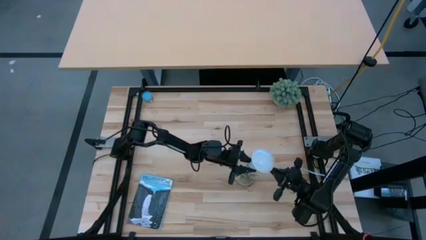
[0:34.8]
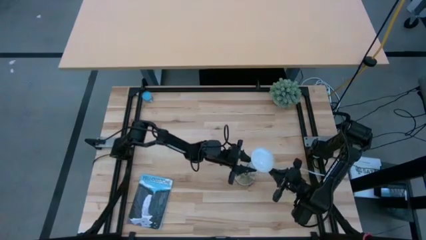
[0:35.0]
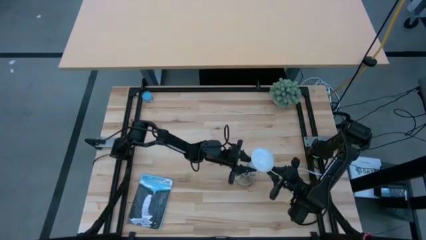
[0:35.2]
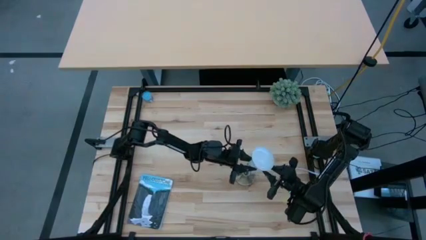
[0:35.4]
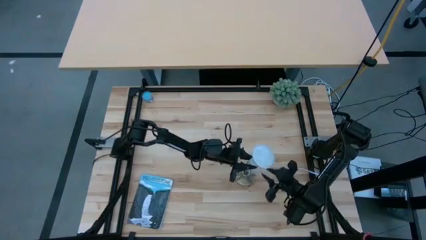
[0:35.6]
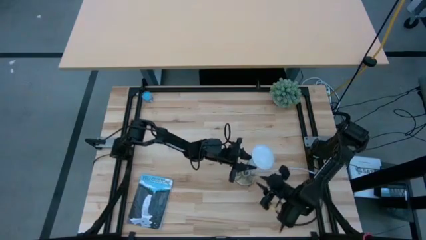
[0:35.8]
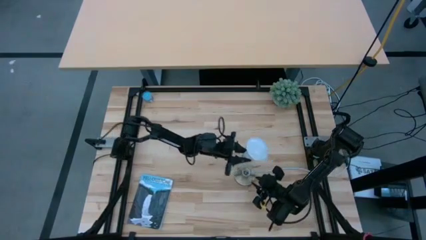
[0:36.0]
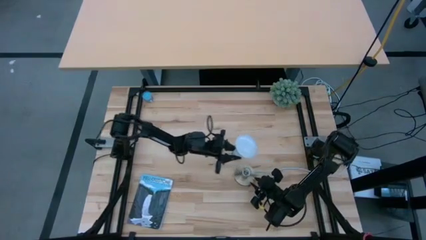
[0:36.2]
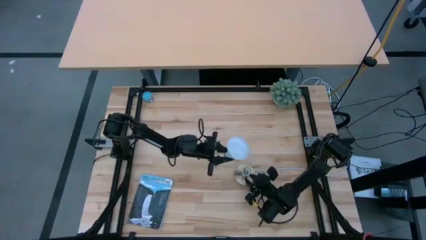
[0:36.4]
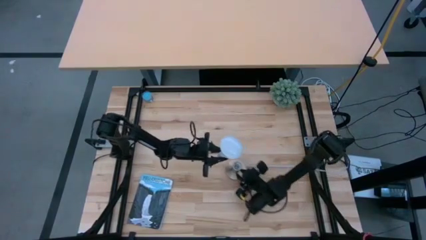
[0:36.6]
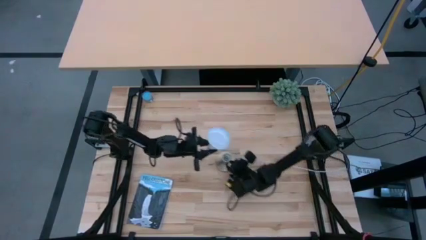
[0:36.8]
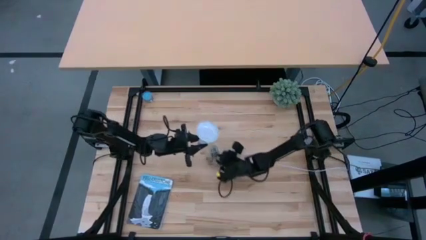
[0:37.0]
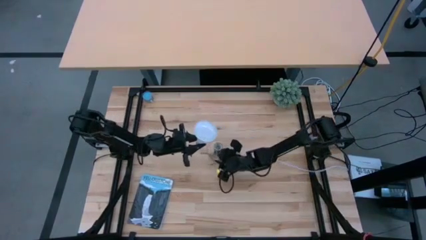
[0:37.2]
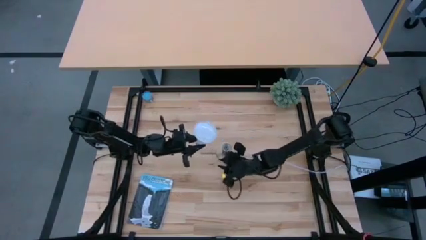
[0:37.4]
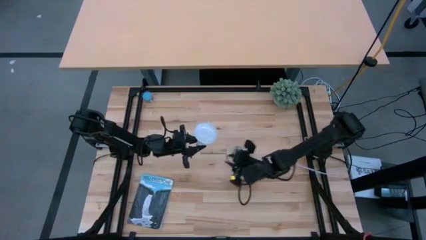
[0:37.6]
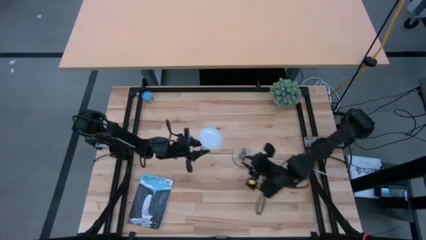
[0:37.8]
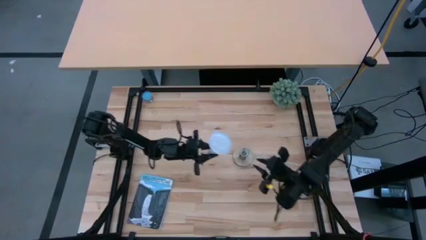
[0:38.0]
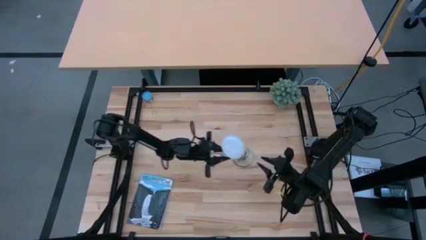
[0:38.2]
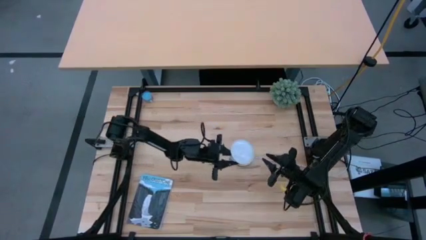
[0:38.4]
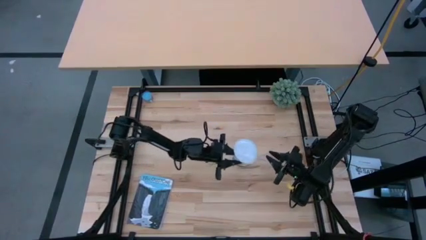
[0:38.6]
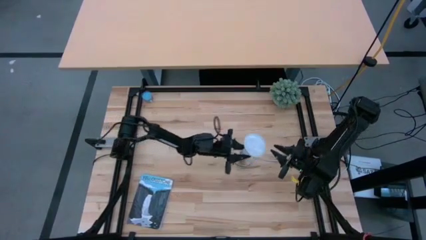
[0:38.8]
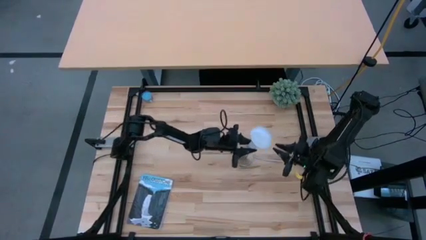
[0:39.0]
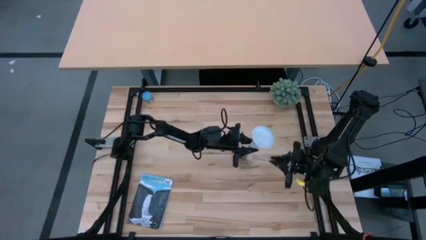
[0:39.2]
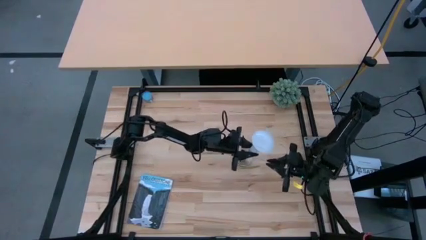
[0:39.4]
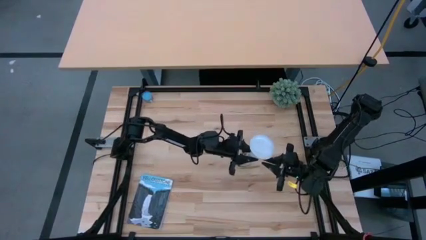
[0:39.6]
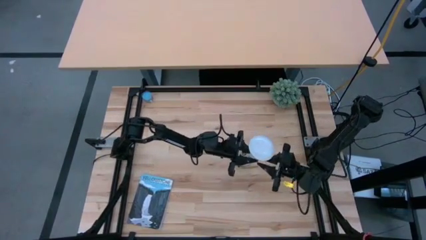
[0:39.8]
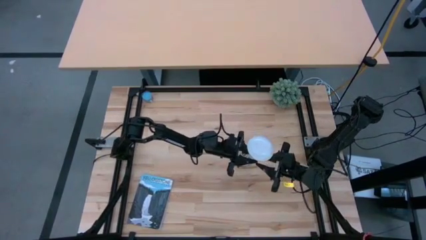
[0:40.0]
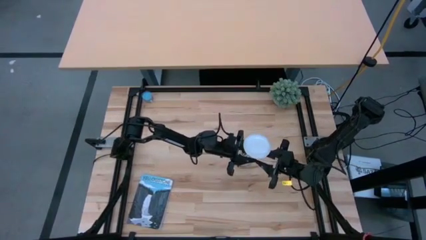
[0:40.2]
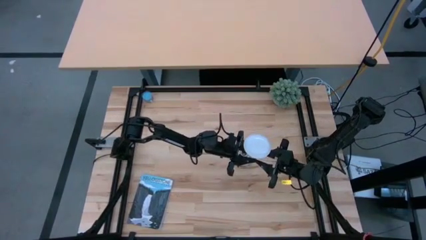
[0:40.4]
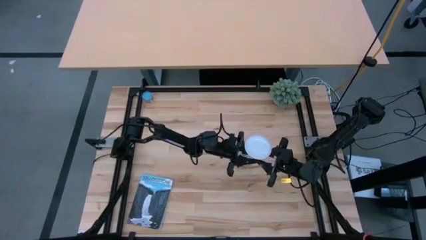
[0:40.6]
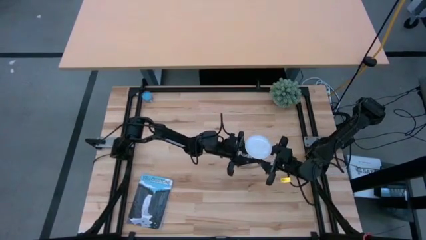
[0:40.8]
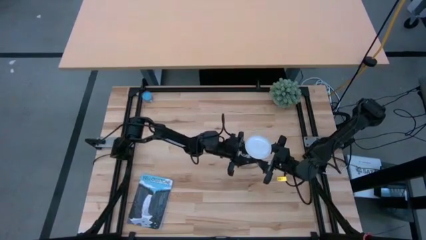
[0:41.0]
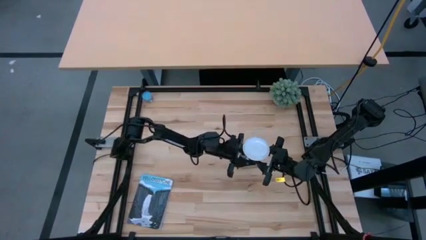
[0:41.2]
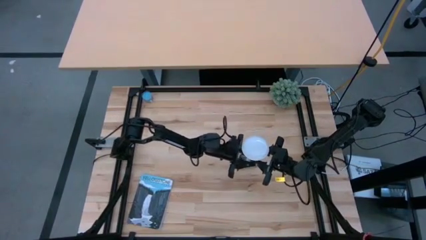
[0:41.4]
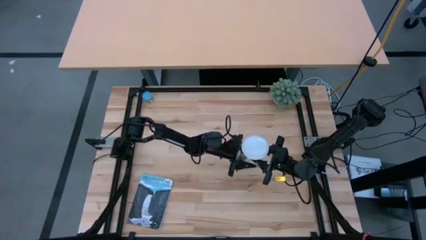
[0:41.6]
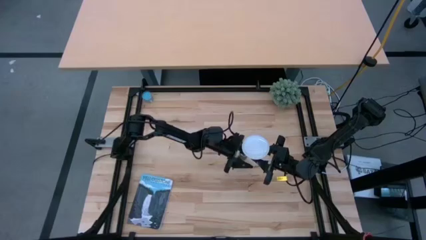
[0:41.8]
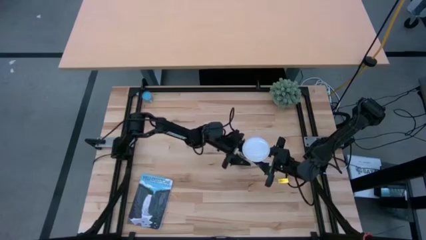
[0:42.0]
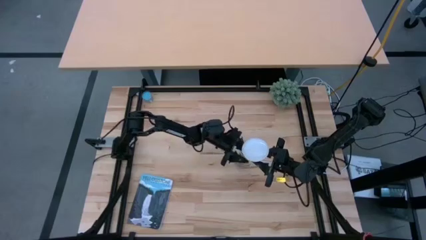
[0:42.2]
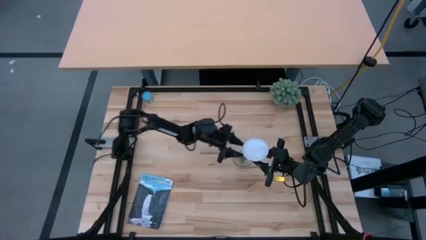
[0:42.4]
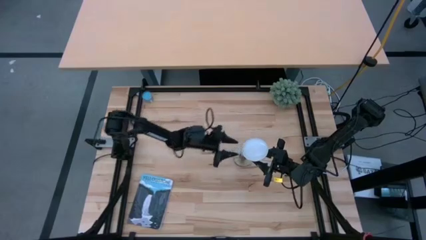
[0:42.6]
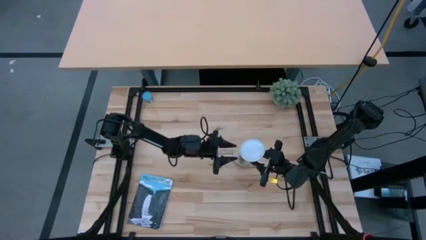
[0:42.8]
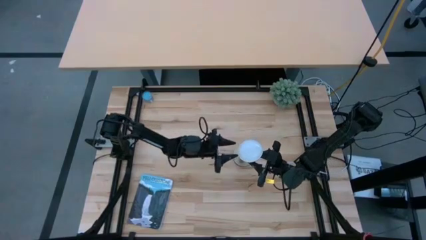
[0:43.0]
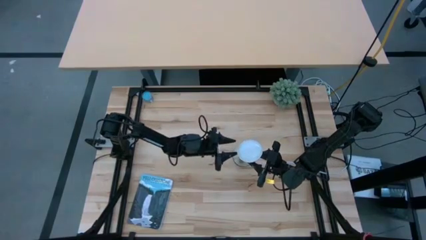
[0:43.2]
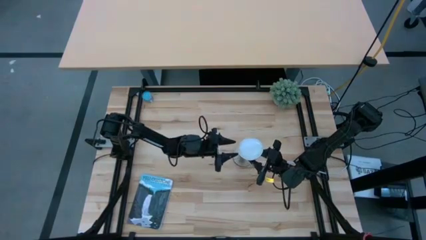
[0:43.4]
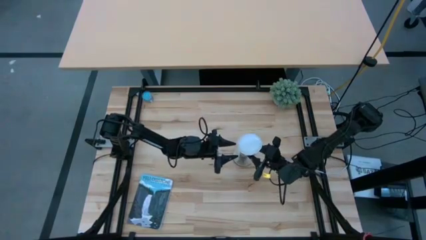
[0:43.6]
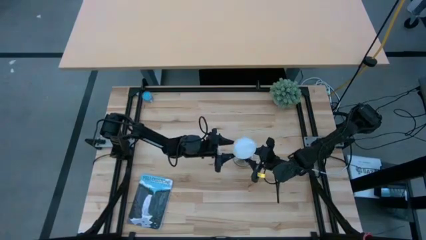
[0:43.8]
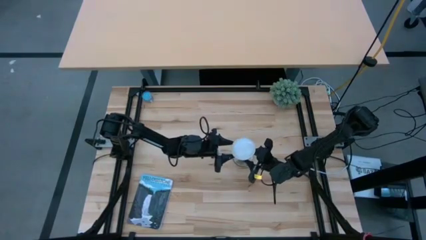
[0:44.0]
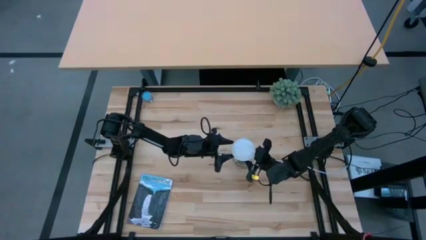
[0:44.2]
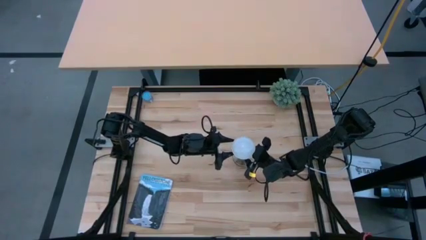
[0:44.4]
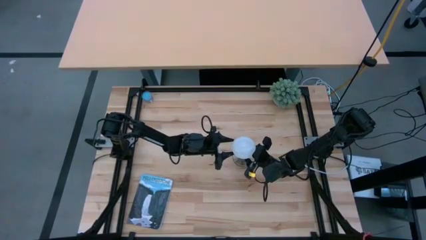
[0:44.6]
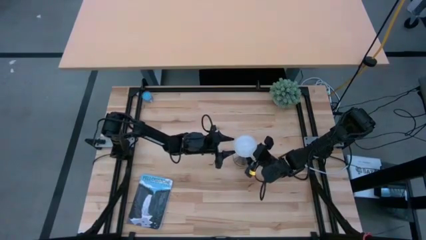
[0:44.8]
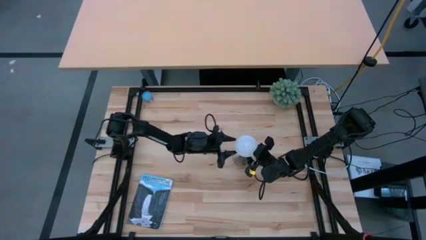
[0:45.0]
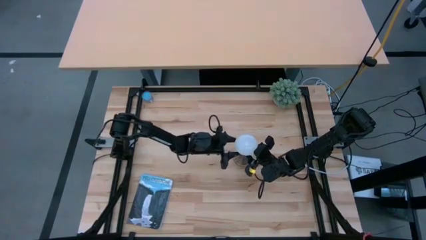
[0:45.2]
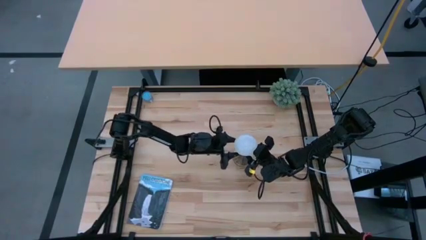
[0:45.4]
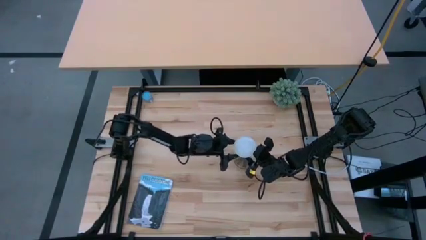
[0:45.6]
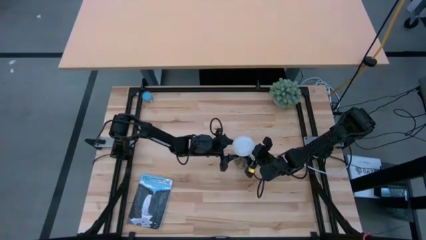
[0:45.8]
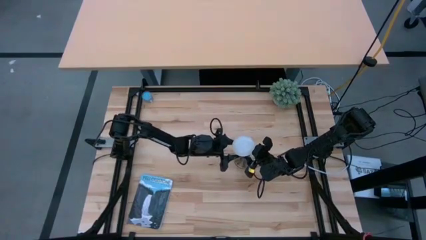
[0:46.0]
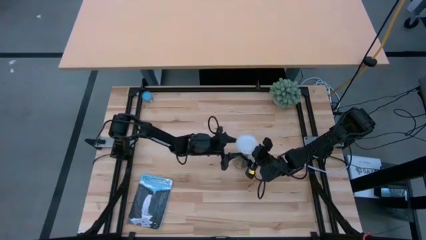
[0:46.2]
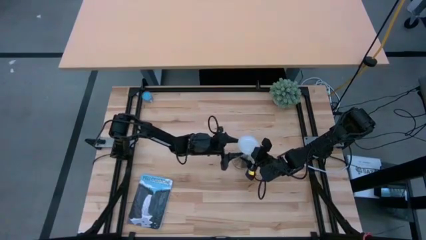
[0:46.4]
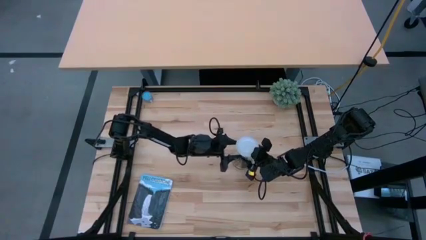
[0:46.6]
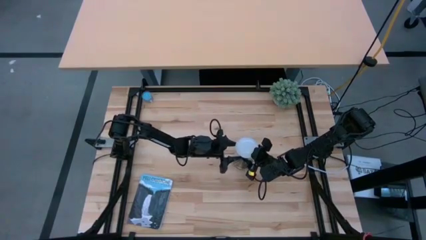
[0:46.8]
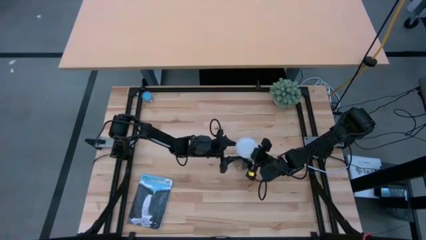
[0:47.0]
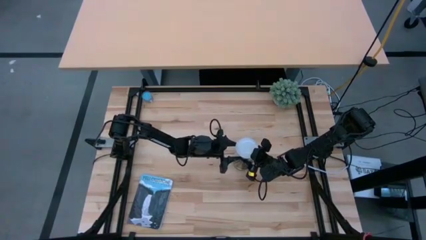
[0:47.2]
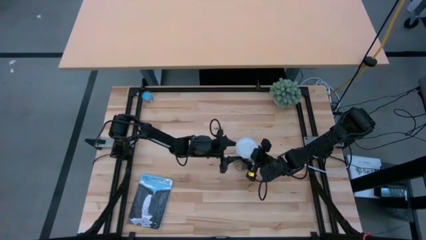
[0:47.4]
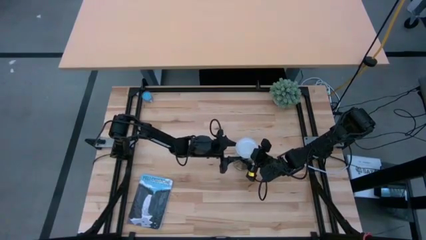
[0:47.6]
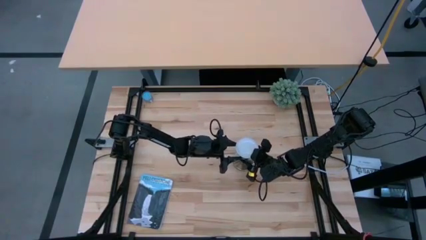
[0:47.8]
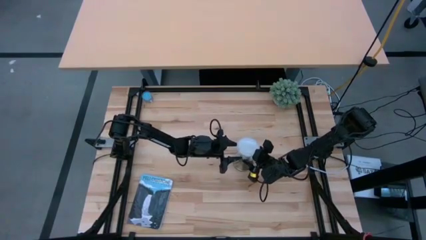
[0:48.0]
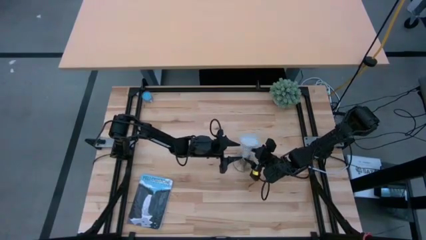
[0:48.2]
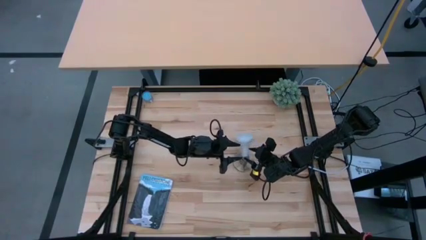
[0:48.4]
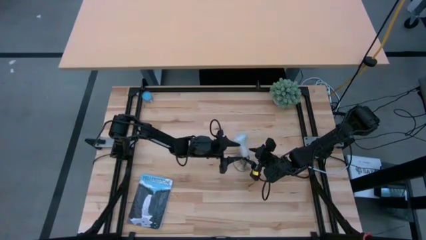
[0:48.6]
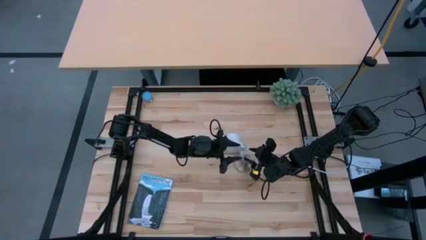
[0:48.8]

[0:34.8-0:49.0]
Task: Screw lightbulb
Insert the lightbulb into the bronze lamp socket

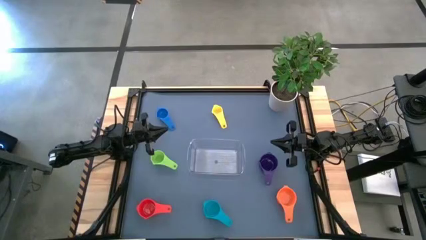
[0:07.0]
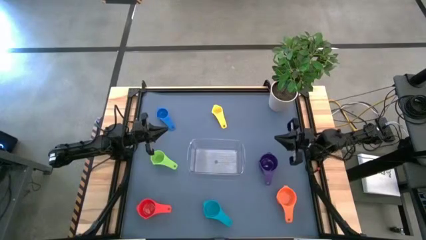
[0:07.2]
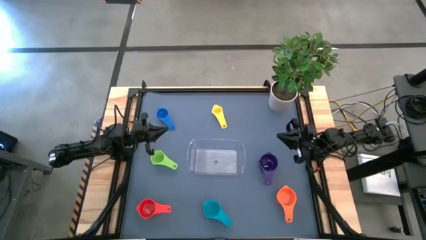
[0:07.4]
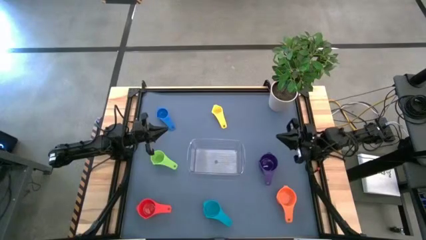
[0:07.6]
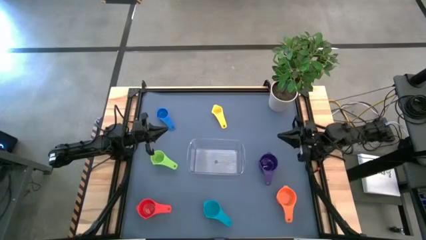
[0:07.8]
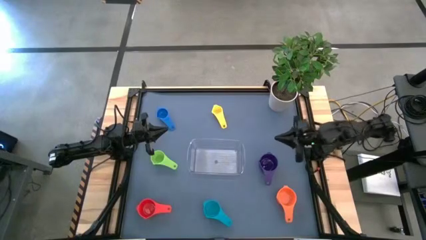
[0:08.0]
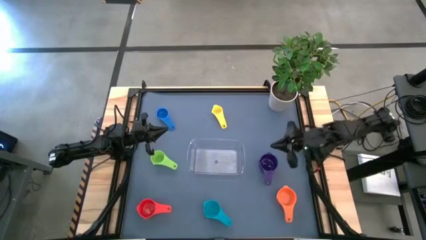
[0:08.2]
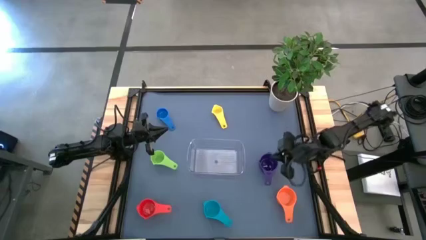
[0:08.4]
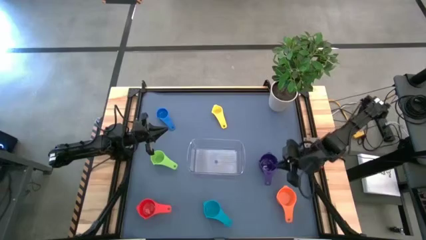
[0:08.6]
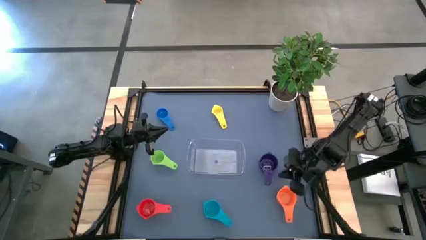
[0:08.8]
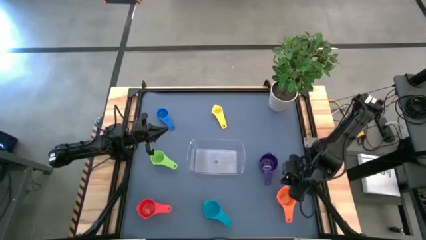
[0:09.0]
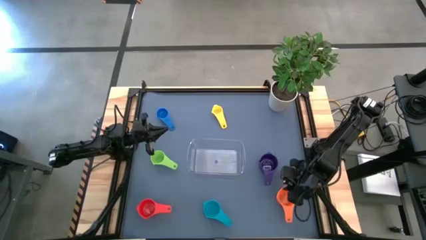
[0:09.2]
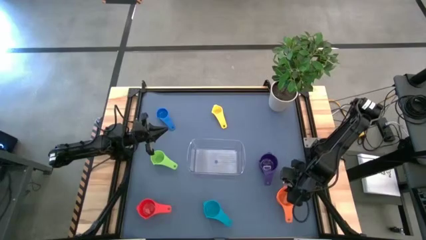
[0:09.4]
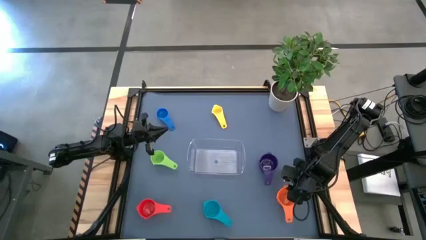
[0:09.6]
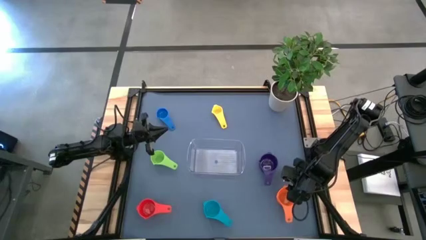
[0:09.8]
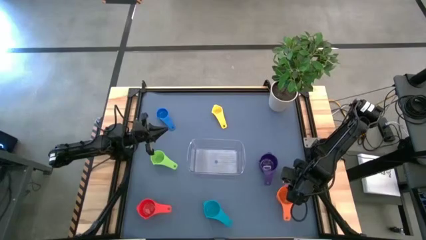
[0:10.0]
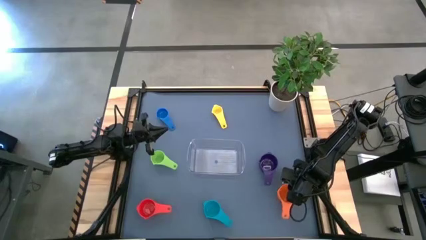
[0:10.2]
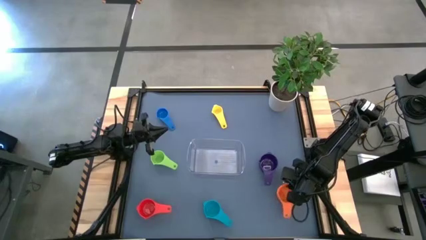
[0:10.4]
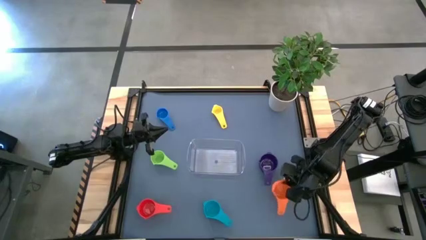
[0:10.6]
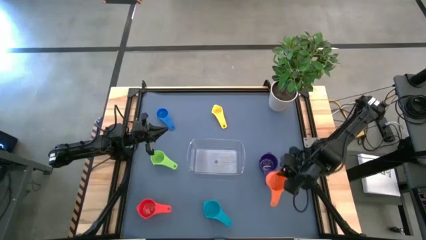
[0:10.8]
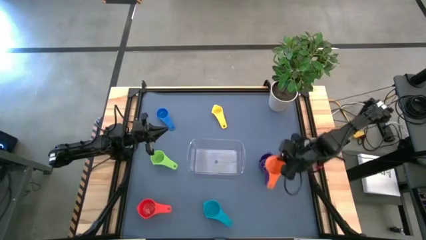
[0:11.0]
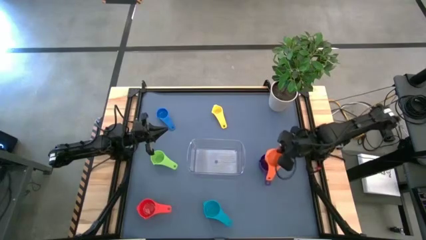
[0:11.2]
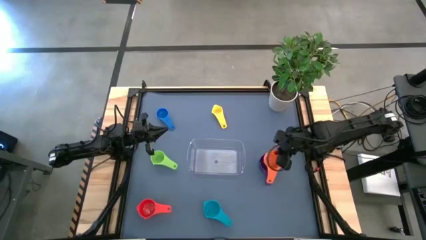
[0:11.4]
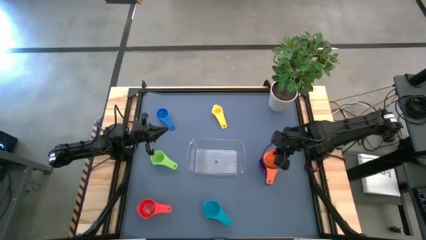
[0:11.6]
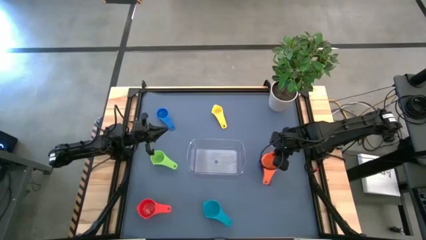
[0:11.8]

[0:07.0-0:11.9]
Task: Nest measuring cups in basket
Stack the orange measuring cup on top of the purple measuring cup
